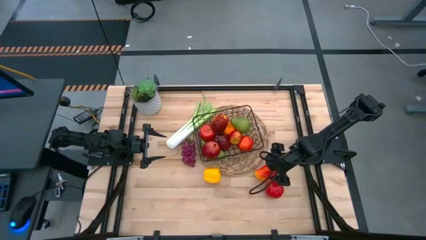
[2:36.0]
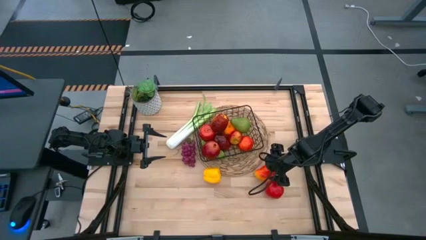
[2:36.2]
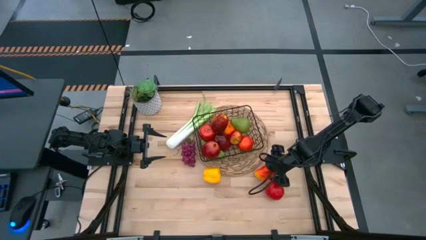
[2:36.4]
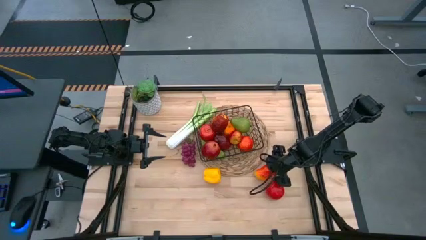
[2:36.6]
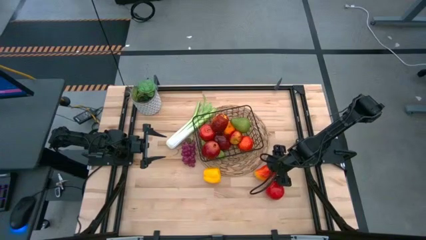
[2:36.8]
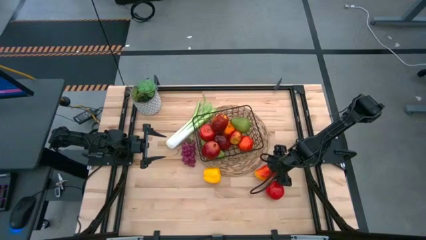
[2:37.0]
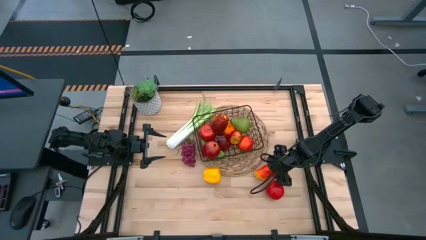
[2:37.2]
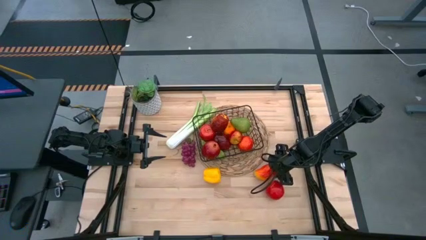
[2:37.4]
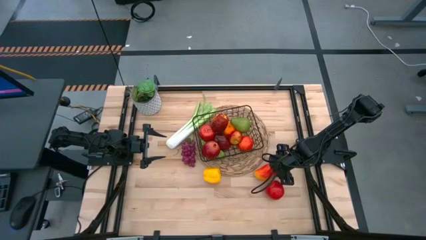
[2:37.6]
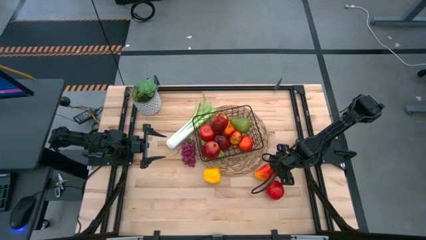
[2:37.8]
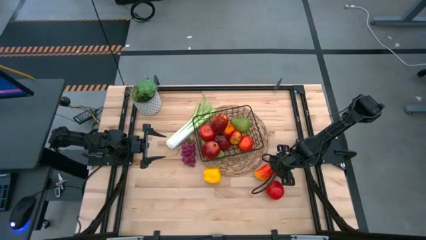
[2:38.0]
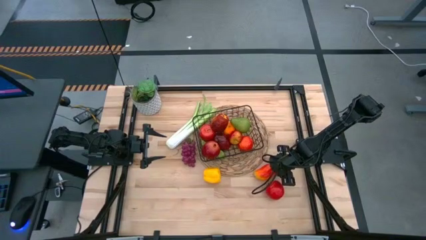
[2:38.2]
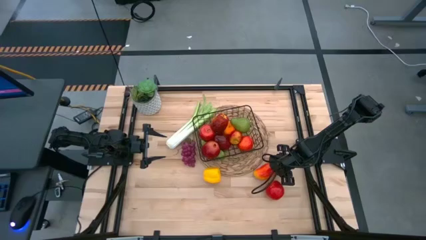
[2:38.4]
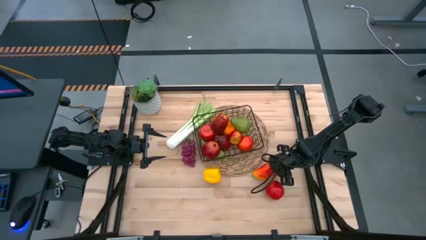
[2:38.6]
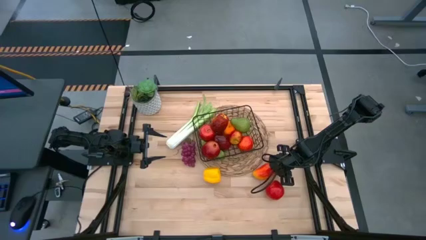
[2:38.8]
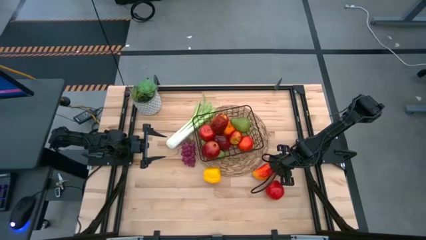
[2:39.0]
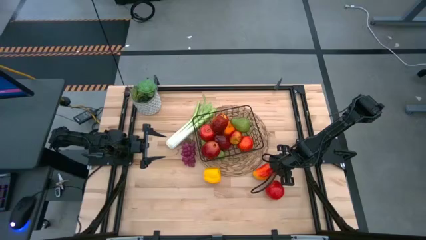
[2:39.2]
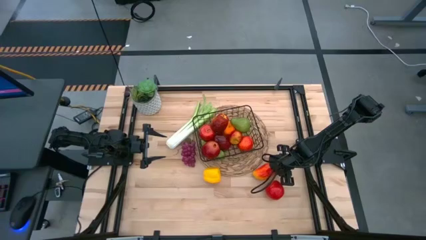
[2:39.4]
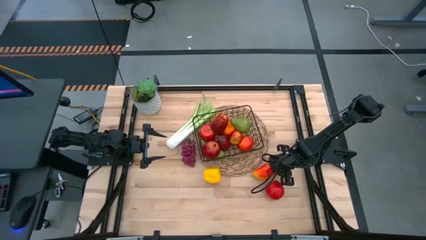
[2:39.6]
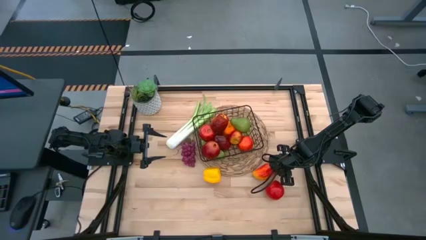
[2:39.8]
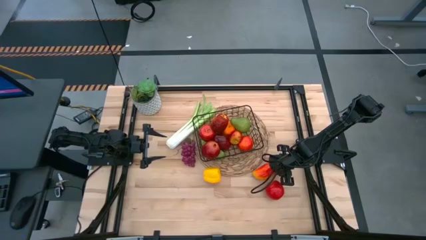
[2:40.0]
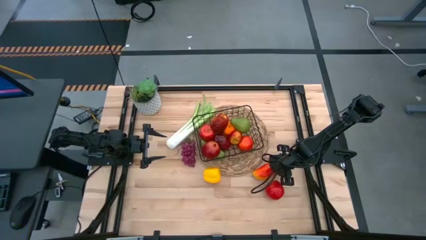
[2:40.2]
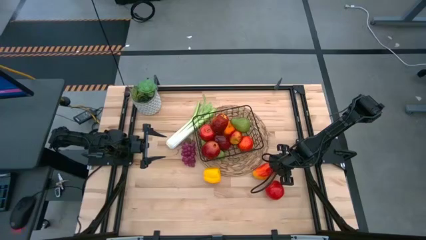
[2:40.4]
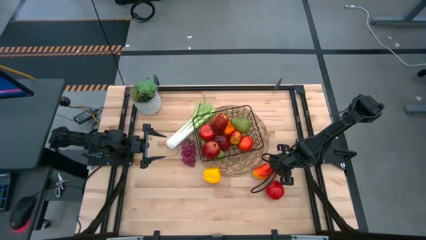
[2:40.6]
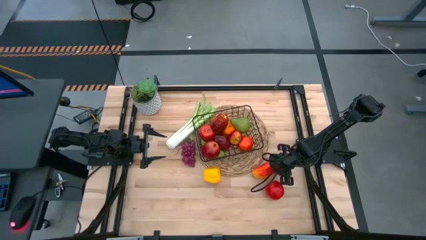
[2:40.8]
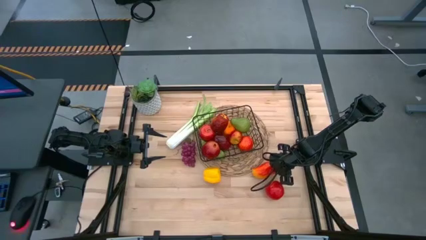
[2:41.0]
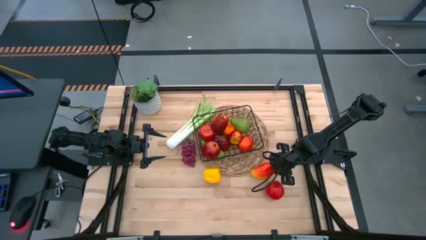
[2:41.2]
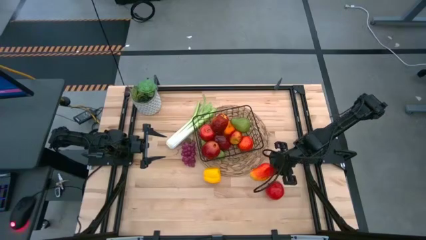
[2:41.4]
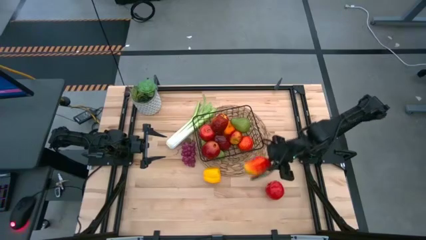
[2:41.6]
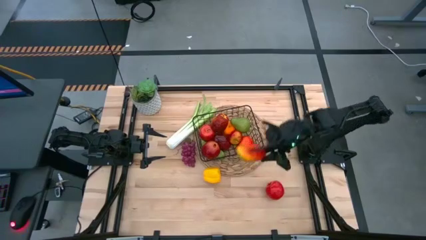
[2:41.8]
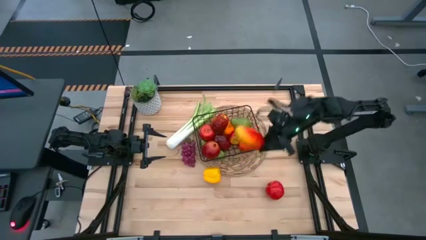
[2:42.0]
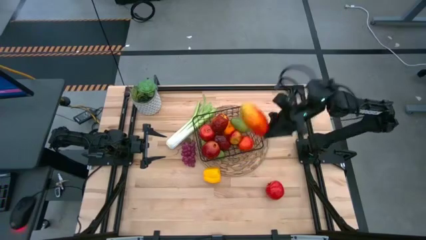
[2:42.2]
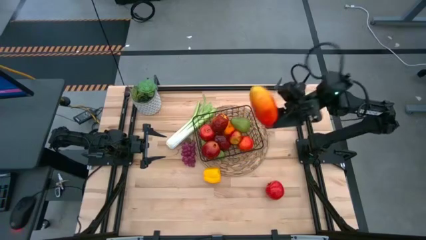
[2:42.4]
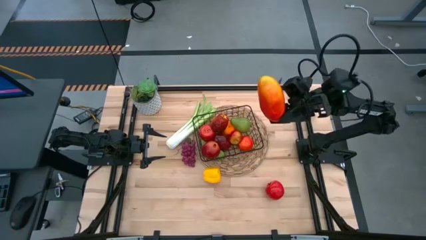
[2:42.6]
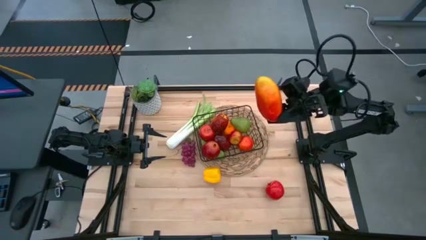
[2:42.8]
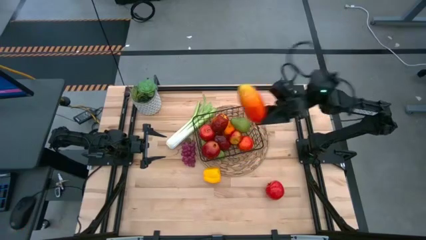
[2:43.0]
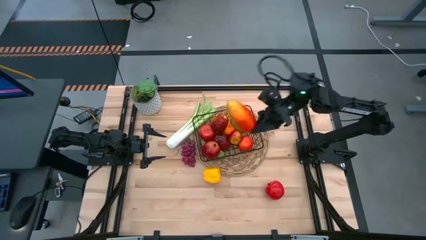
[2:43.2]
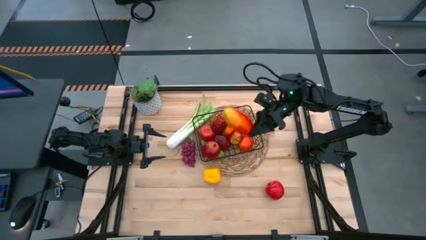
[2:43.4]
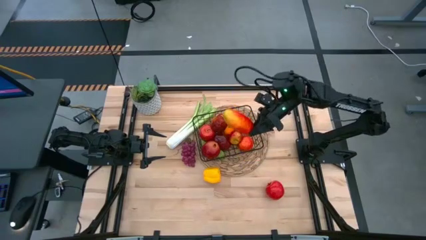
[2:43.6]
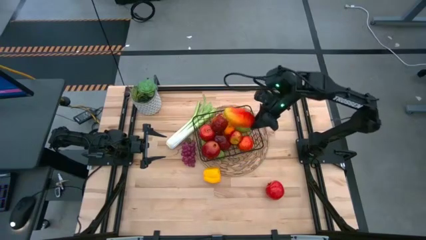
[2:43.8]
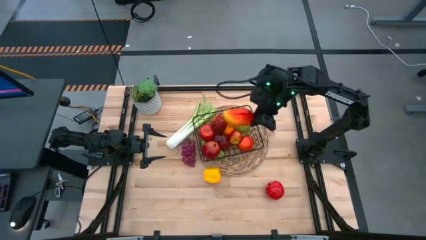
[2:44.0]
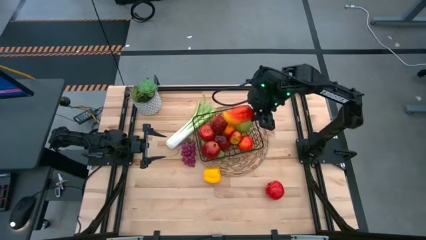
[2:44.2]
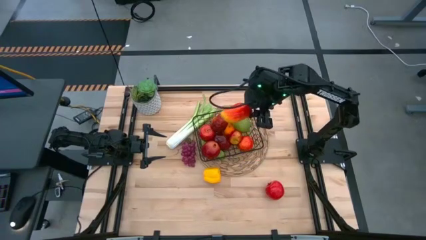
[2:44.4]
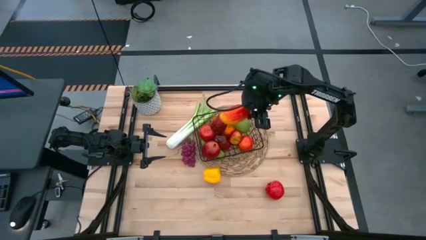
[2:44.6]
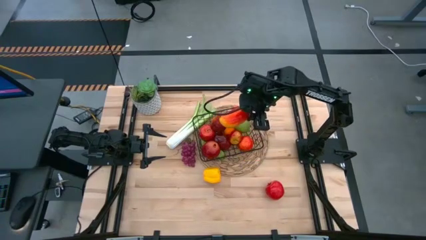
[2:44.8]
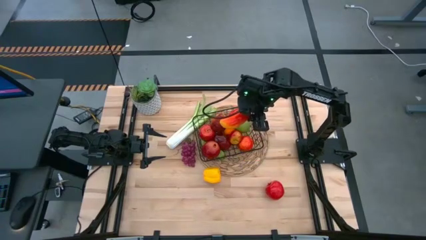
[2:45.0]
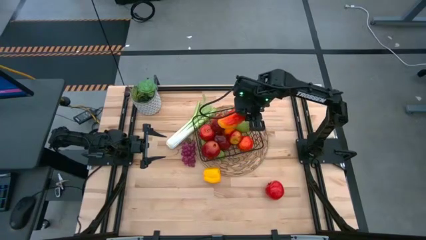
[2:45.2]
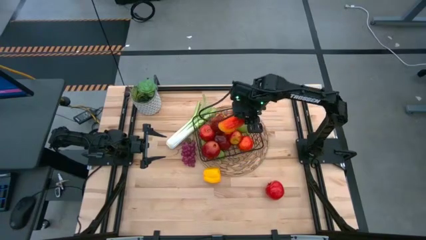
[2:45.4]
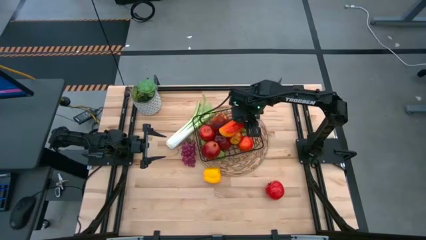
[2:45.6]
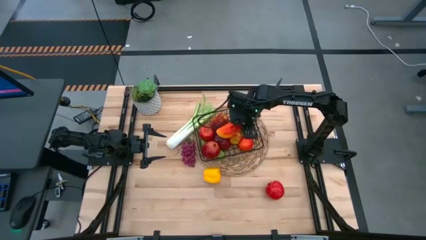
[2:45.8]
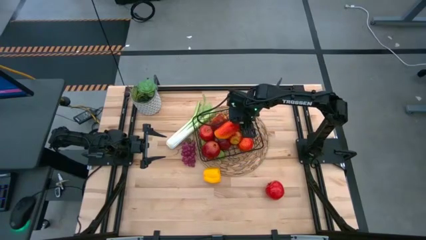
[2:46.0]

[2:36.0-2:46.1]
Task: Build produce basket
Put the red mango into the black wire basket

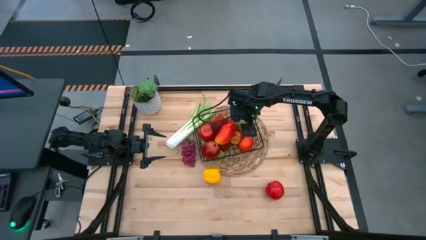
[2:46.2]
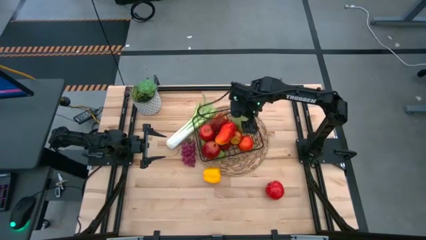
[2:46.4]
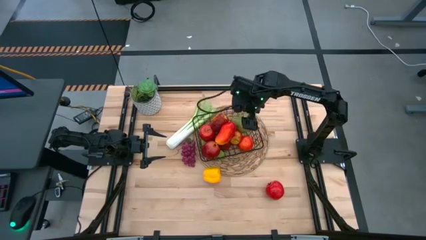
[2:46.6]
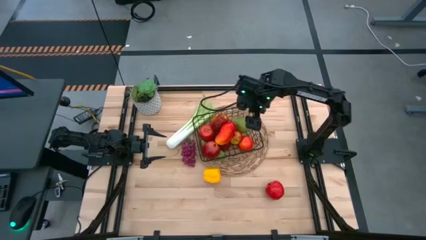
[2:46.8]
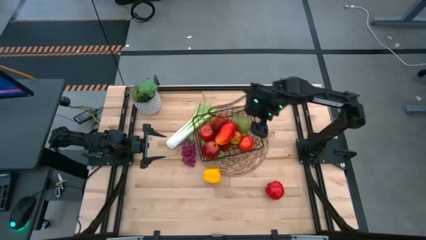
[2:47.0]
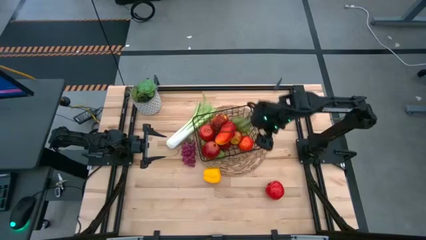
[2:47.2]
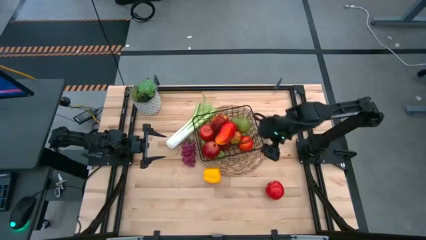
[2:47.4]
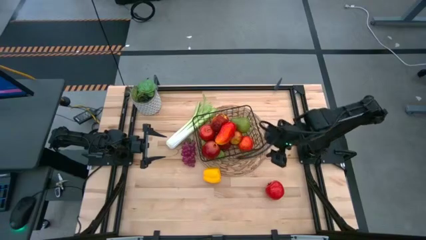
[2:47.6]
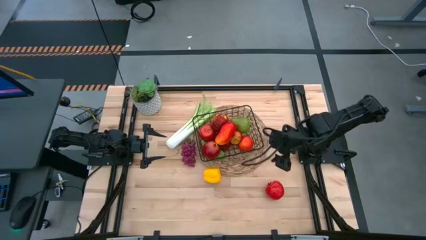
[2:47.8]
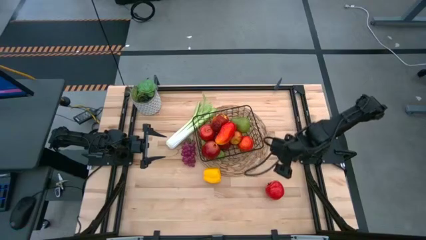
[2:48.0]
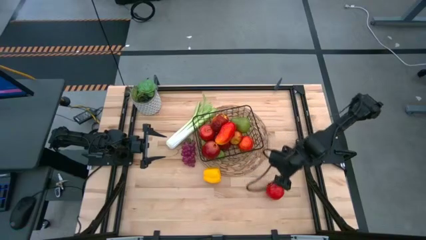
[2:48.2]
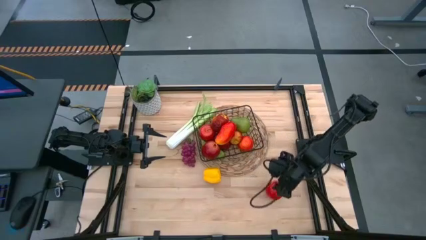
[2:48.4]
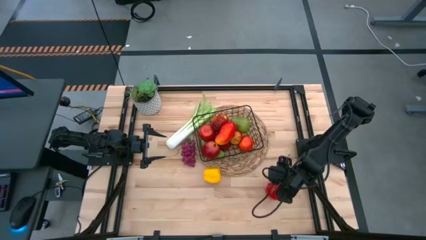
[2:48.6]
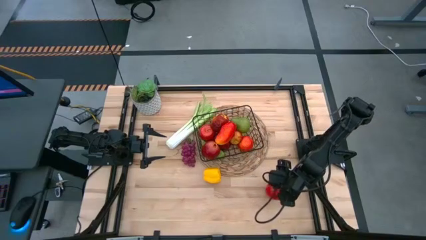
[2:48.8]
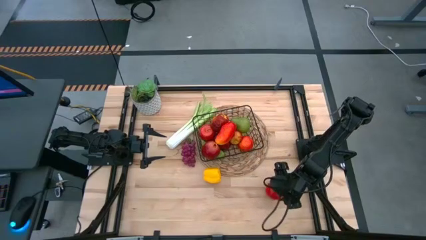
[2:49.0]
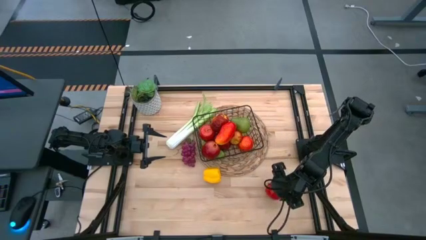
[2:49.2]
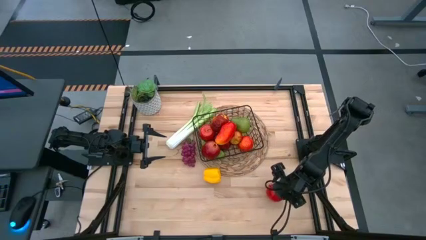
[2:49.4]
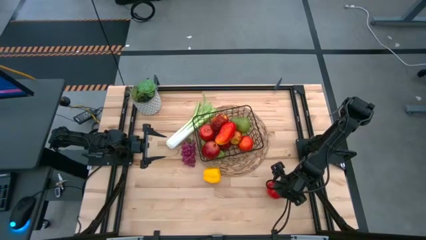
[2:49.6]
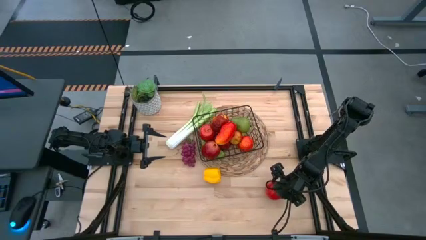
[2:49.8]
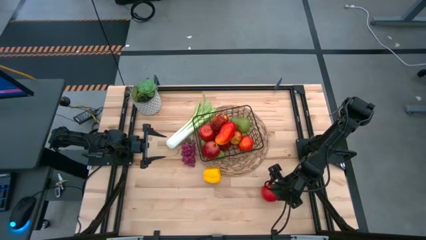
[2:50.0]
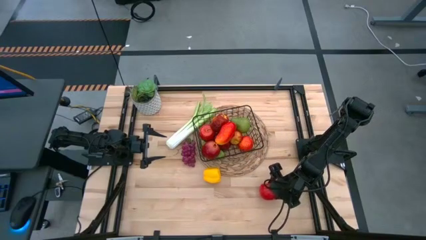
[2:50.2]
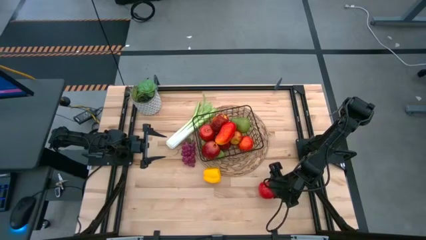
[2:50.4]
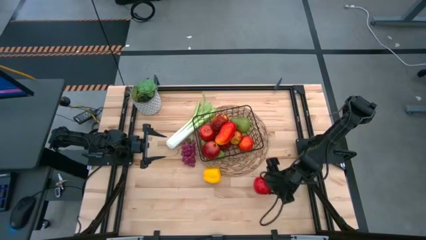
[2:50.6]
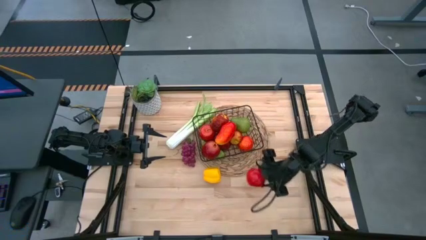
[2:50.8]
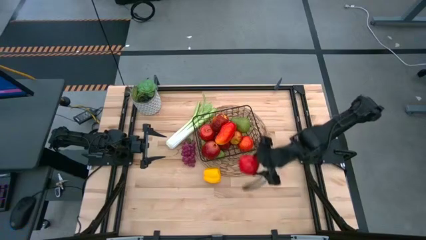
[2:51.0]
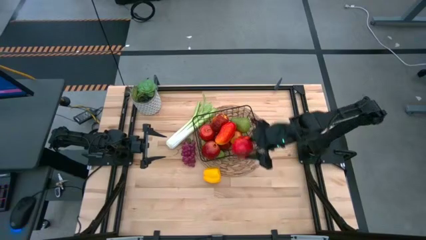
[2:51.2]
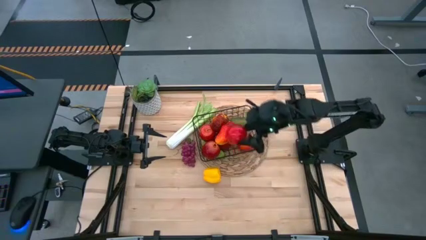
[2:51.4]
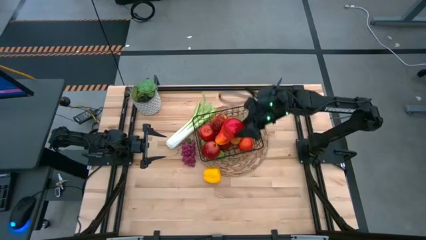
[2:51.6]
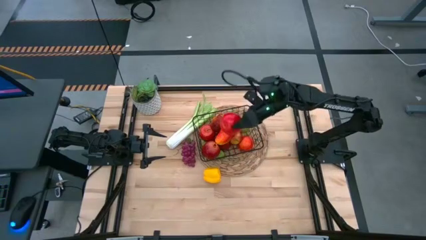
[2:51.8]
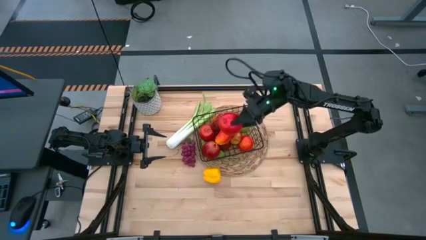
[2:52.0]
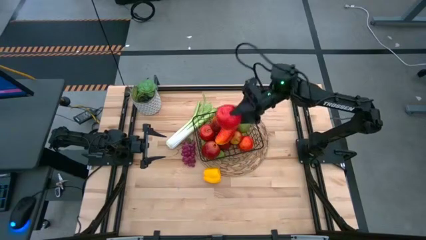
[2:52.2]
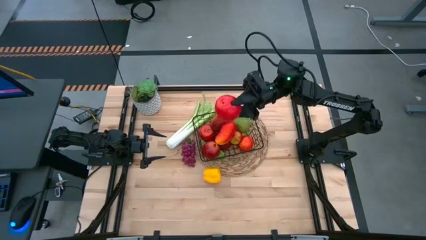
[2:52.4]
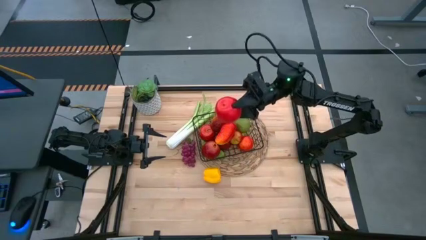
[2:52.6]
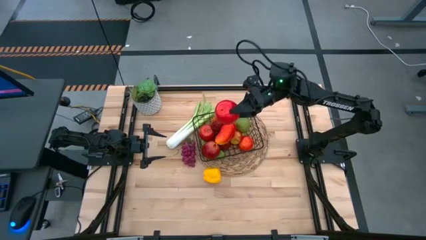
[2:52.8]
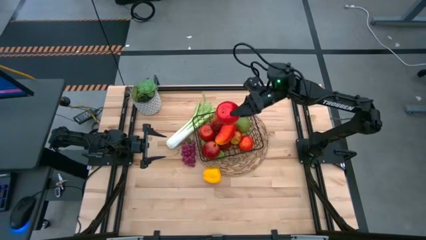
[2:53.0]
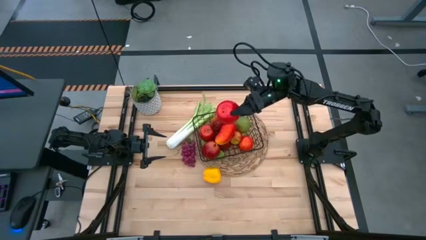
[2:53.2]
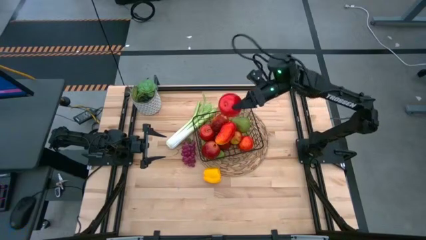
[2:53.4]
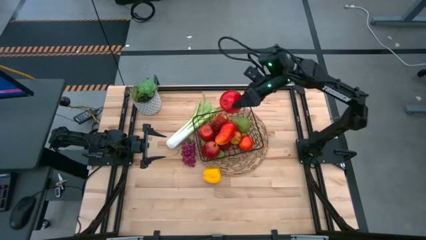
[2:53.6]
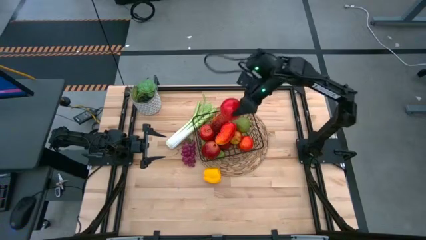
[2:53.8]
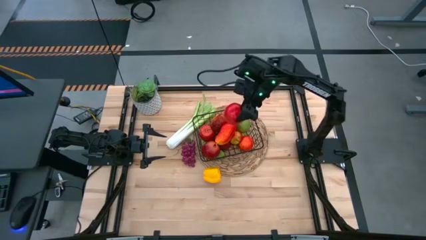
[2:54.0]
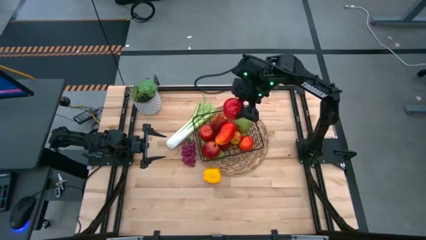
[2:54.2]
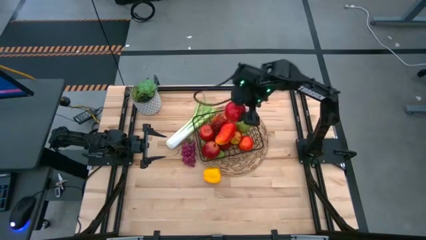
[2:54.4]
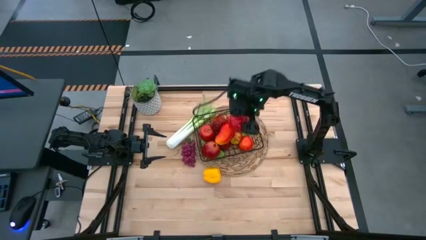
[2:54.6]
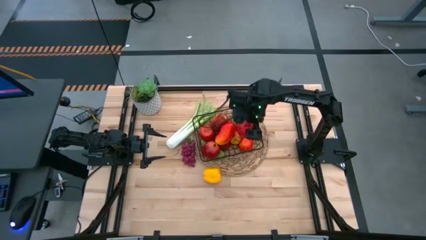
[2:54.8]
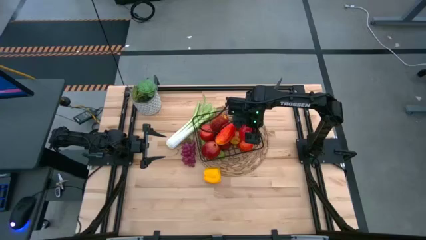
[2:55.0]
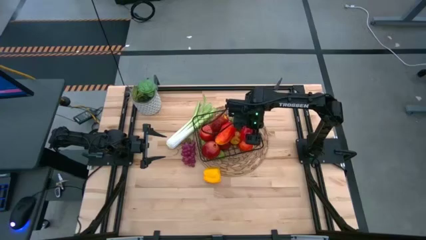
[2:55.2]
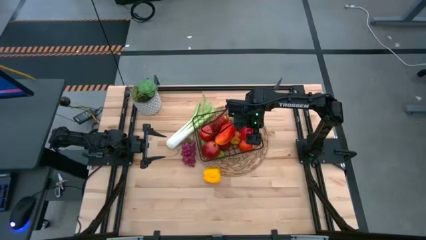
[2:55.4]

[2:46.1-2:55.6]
Put the red apple into the black wire basket
